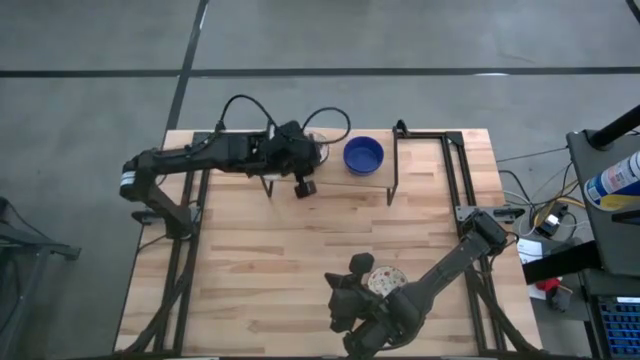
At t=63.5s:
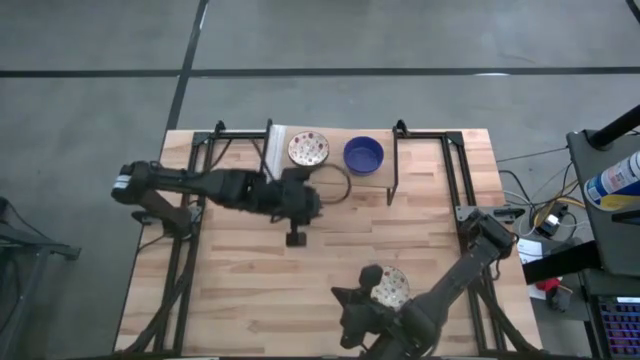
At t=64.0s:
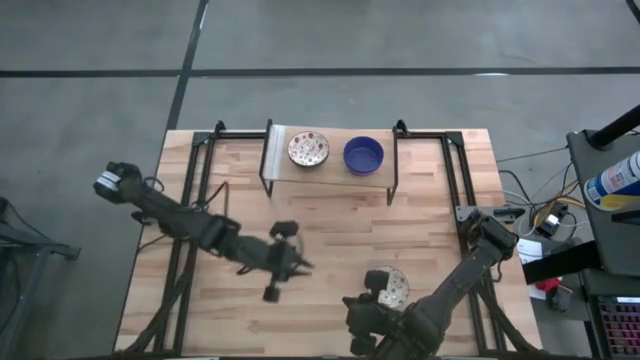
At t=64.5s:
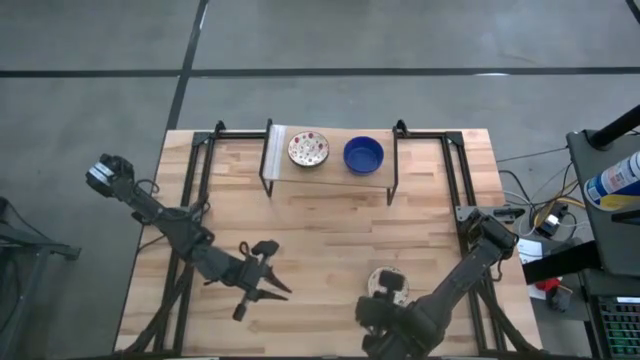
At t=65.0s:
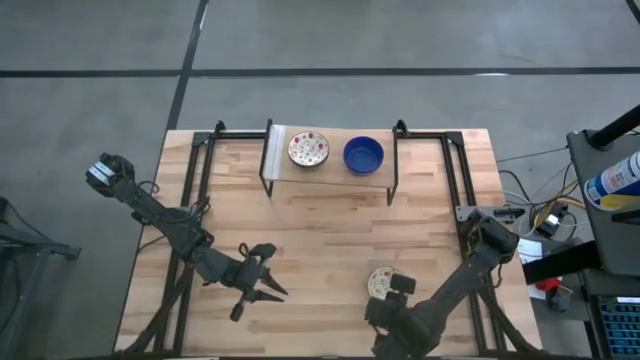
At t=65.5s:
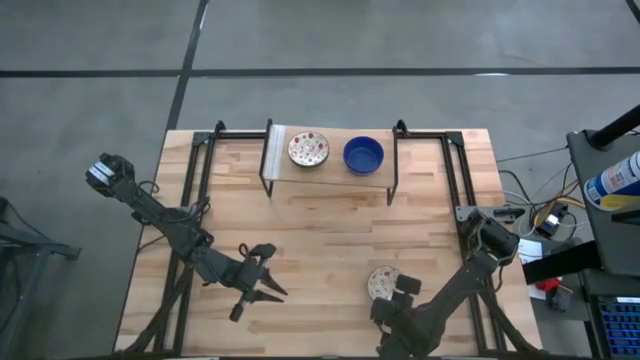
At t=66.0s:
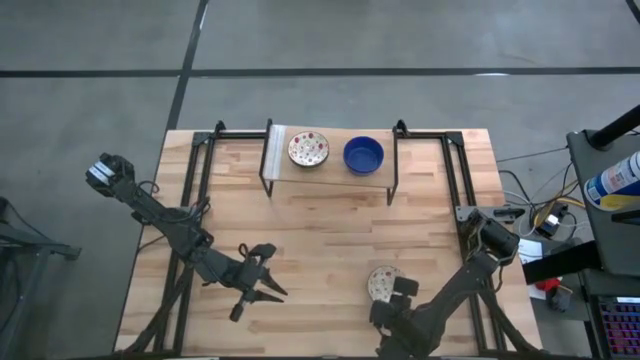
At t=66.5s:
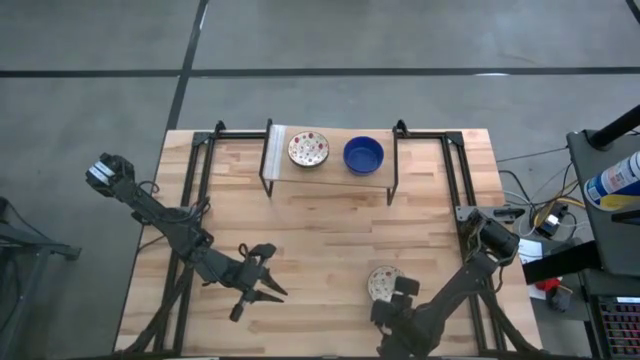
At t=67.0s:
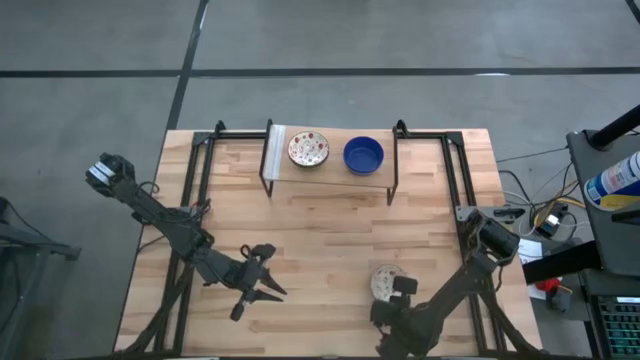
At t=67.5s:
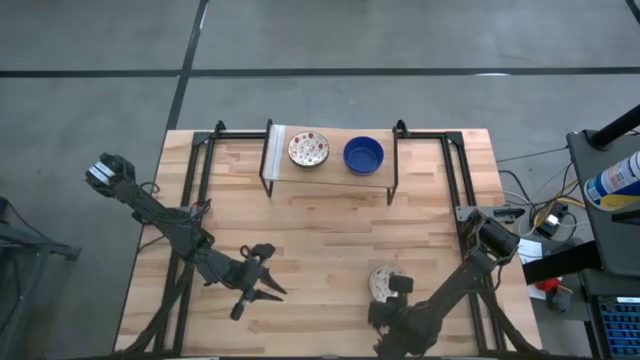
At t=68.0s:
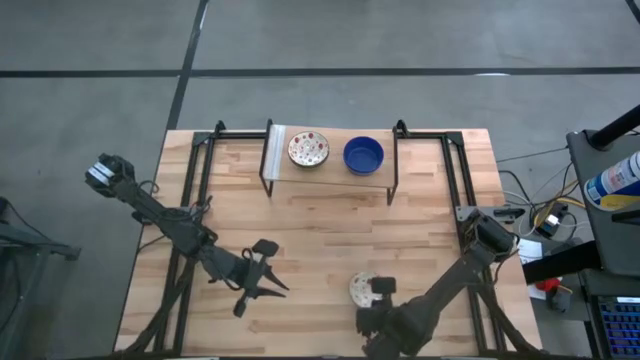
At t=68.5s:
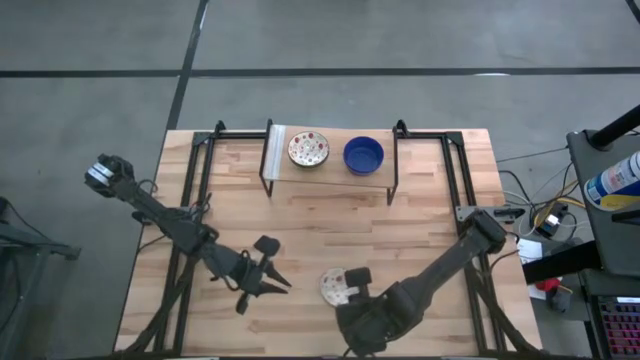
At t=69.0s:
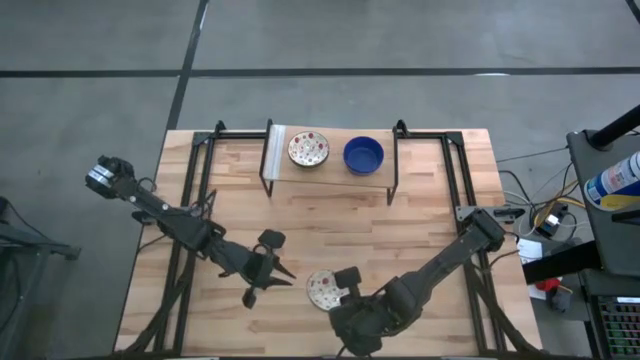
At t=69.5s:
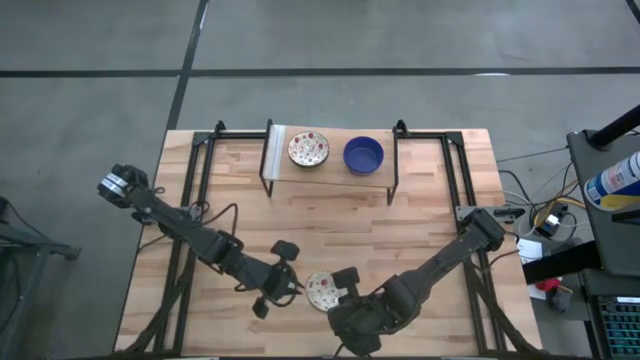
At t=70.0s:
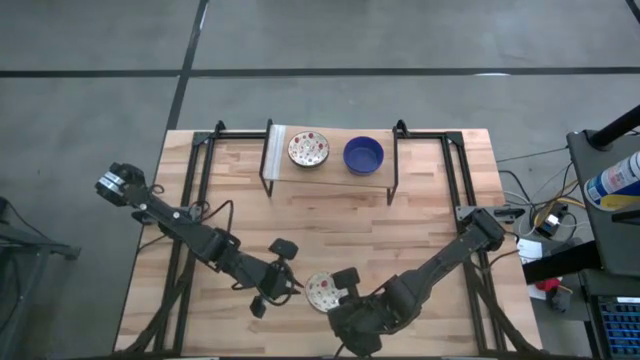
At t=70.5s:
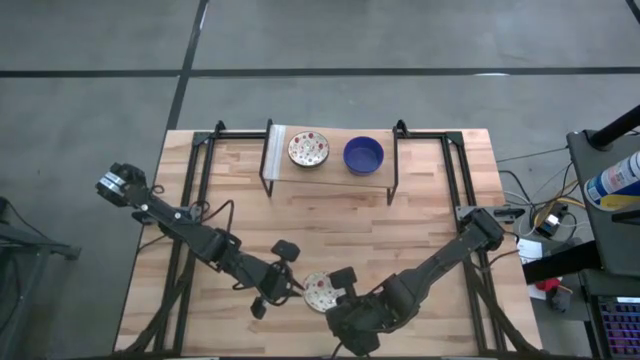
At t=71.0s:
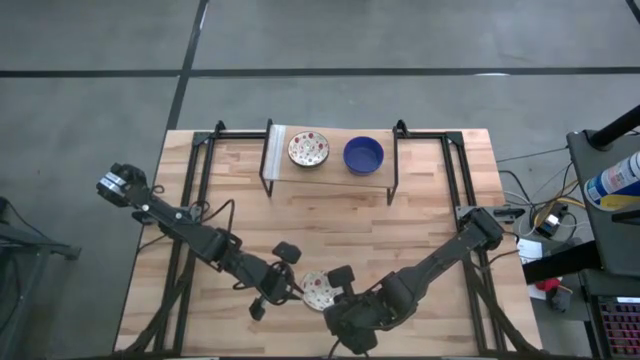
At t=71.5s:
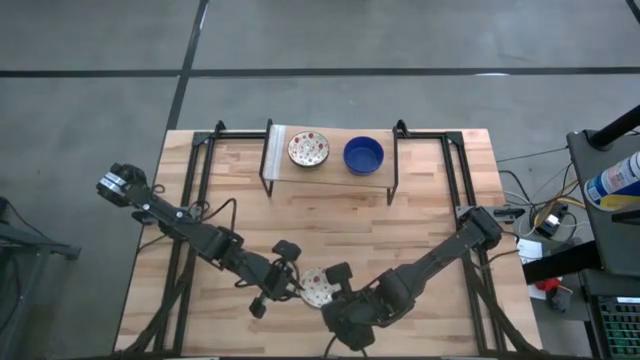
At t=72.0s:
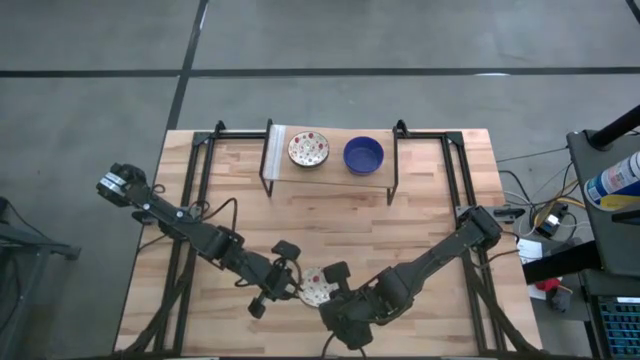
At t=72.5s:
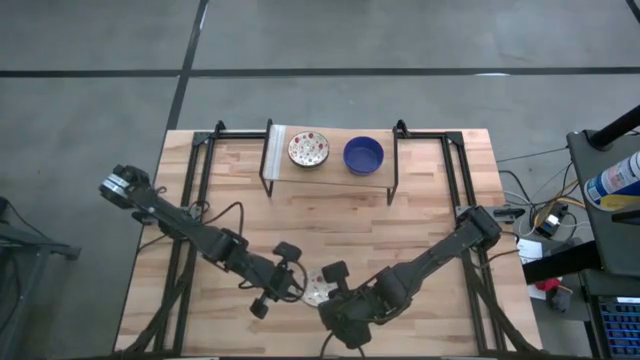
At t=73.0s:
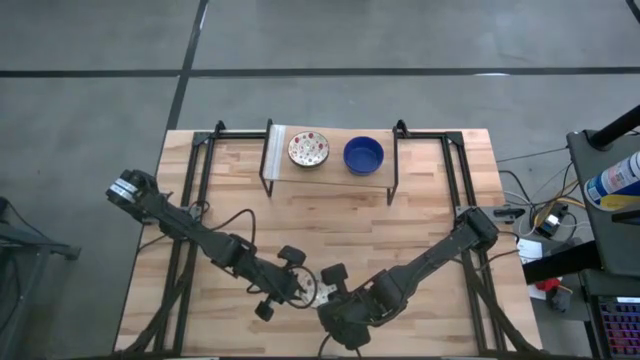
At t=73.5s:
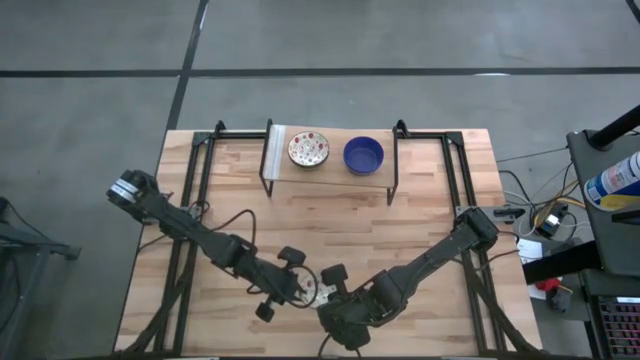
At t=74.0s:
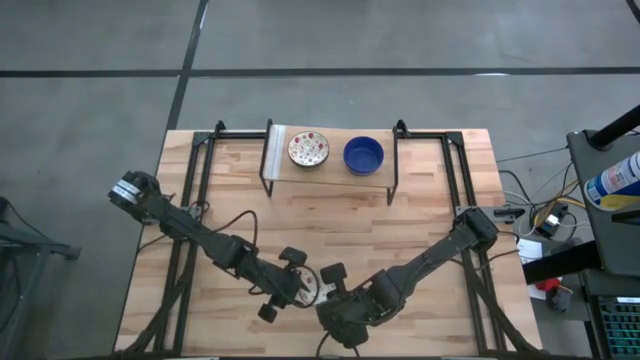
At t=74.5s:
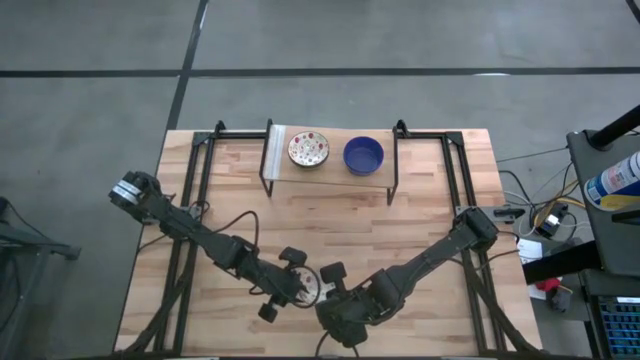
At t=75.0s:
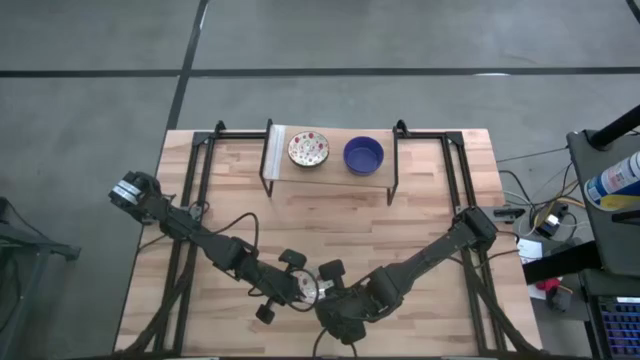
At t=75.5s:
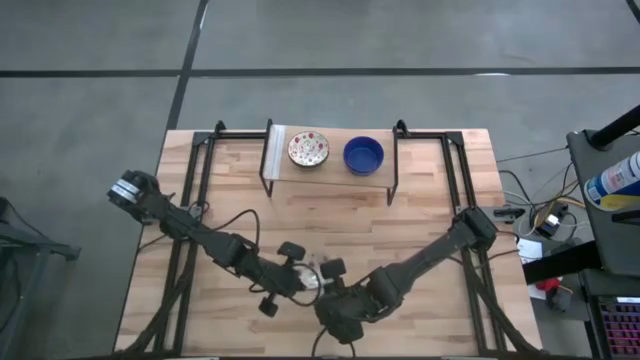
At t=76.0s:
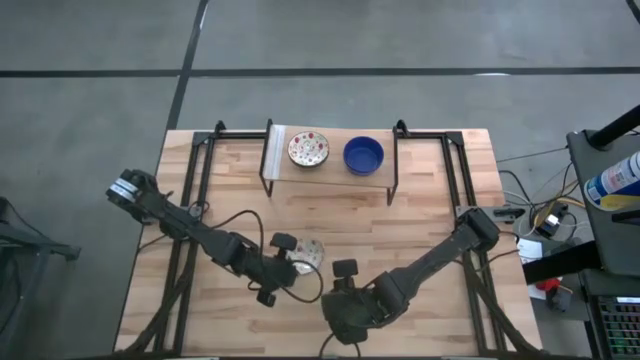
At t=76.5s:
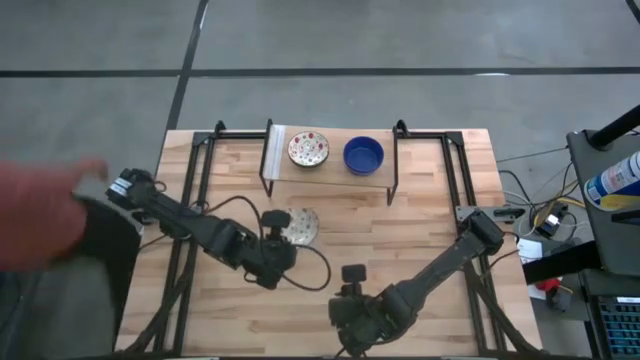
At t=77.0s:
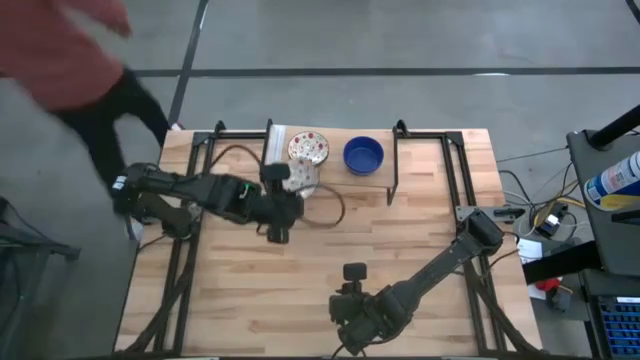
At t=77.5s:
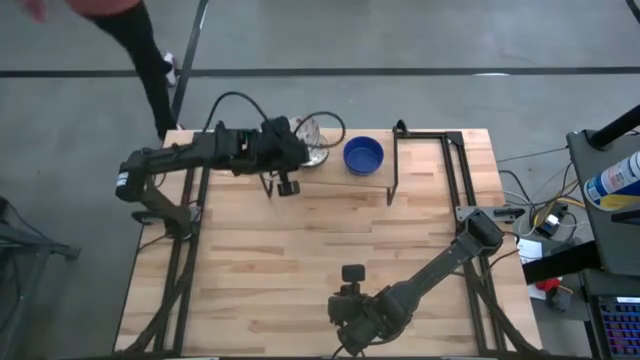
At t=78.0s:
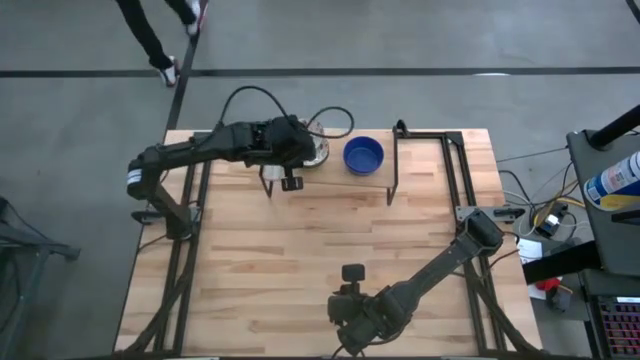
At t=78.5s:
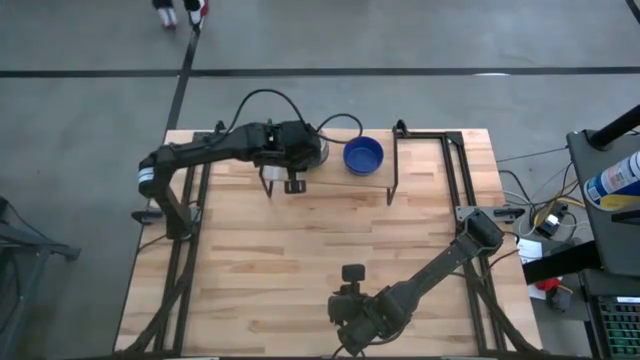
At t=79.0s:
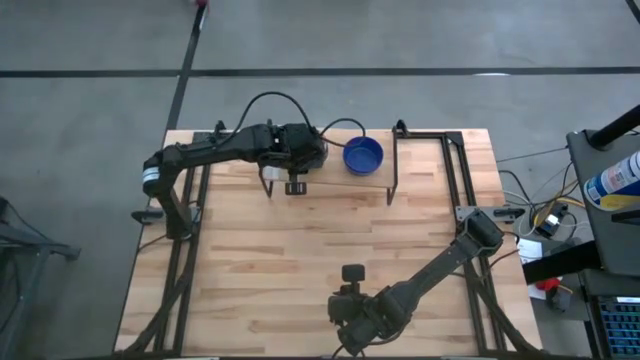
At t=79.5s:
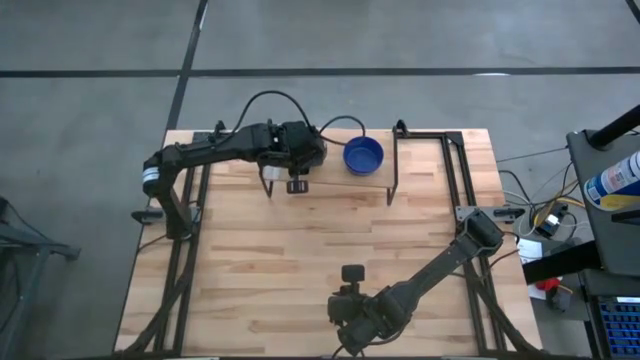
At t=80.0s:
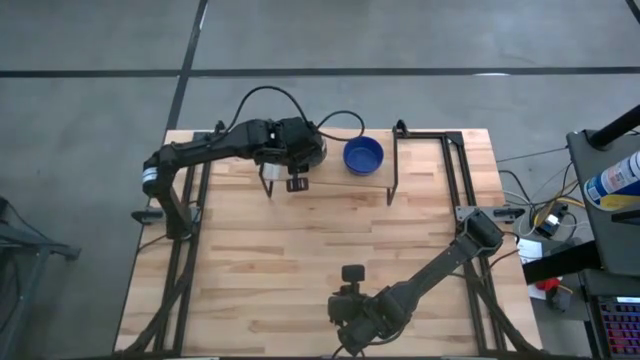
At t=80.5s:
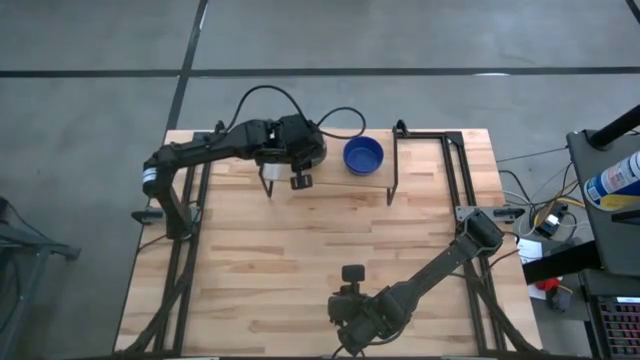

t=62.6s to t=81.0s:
Task: Pick & Place Mini bowls
Stack the red patterned bowl on the red patterned bowl on the shelf

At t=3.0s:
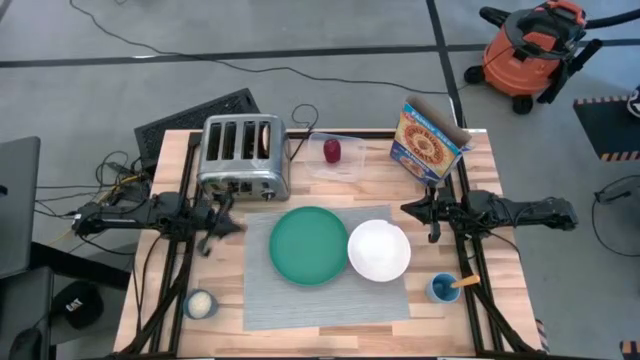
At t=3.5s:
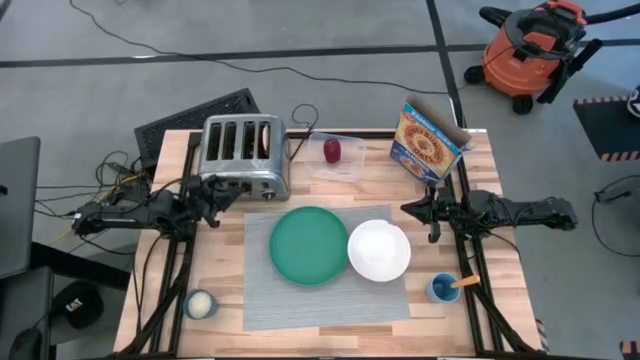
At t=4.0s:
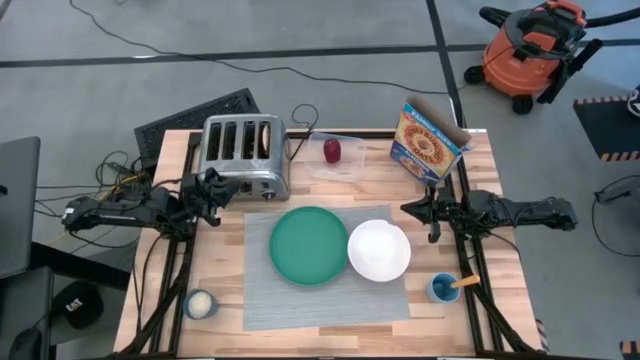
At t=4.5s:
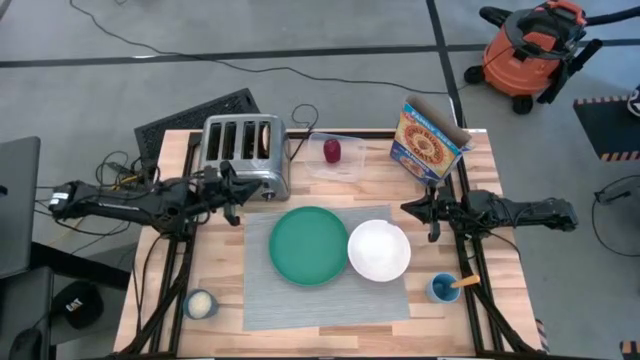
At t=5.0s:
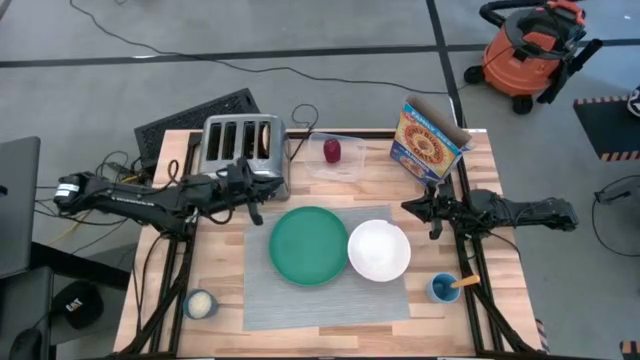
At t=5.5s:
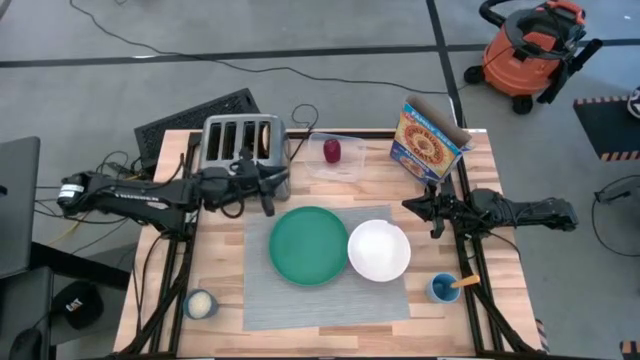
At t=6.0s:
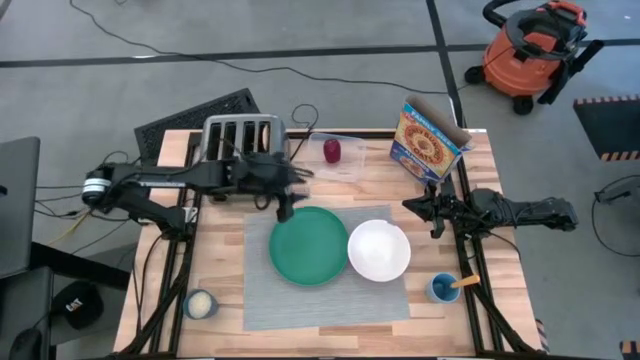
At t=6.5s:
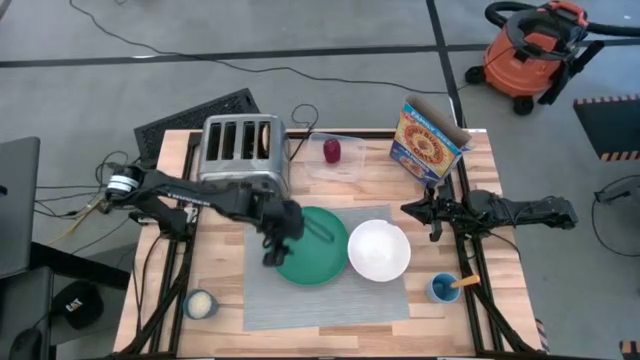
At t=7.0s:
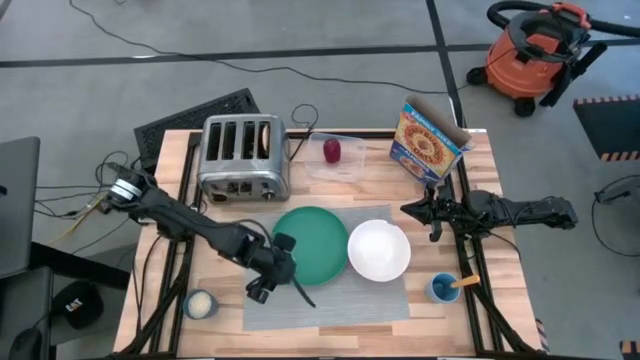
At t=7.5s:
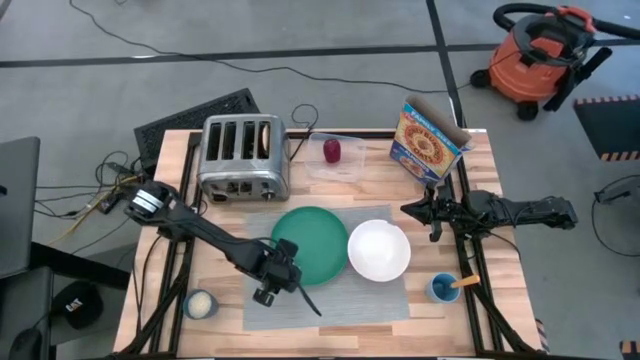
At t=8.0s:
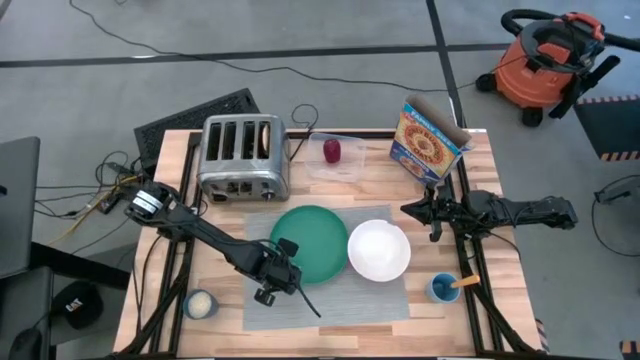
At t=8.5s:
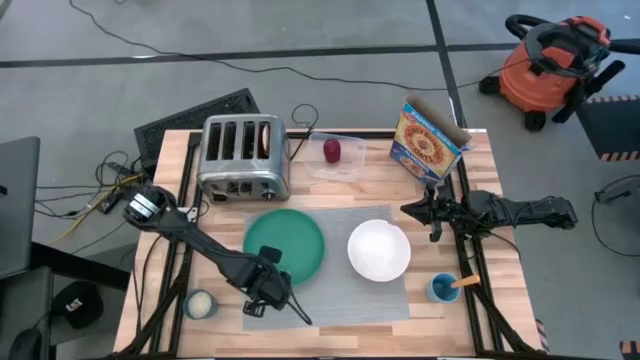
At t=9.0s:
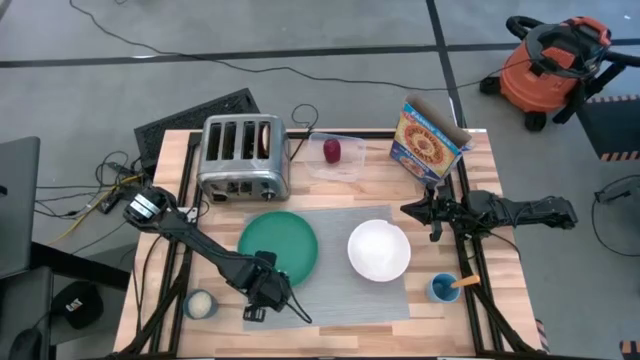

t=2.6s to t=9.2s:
Task: Arrange a breakfast setting
Adjust the green plate on the gray placemat
